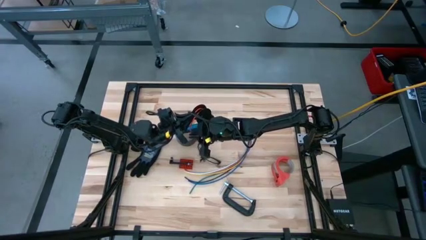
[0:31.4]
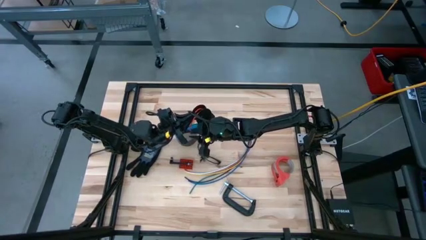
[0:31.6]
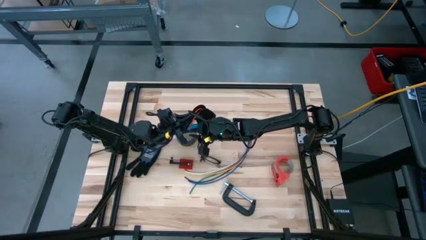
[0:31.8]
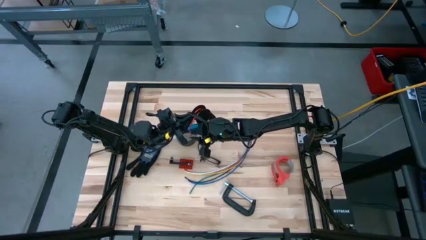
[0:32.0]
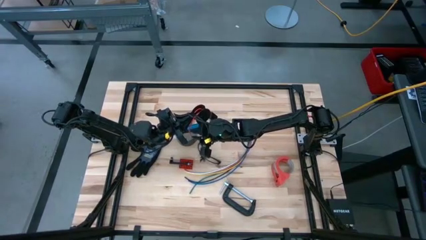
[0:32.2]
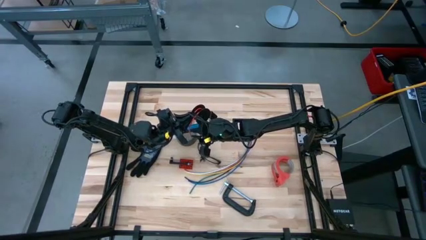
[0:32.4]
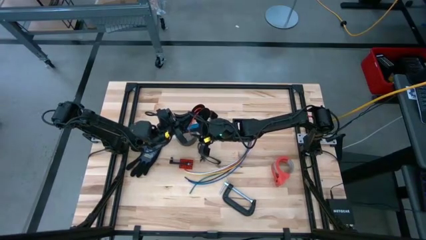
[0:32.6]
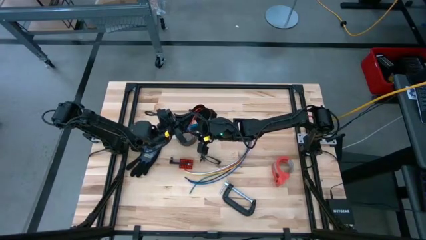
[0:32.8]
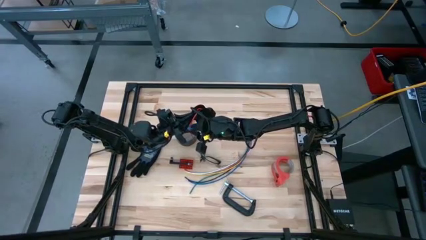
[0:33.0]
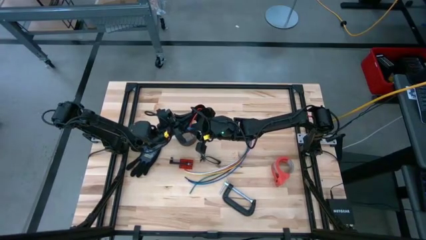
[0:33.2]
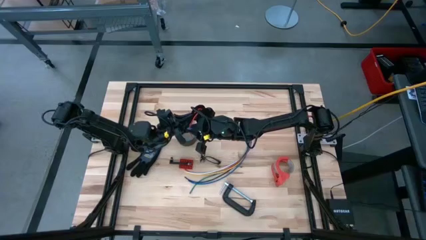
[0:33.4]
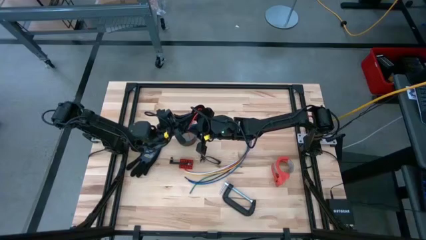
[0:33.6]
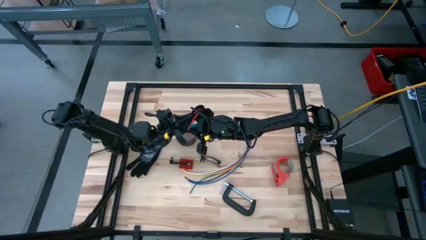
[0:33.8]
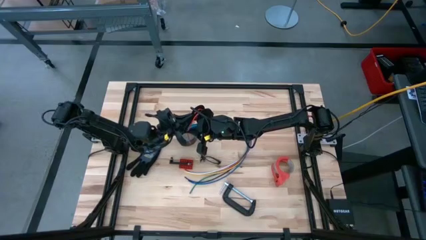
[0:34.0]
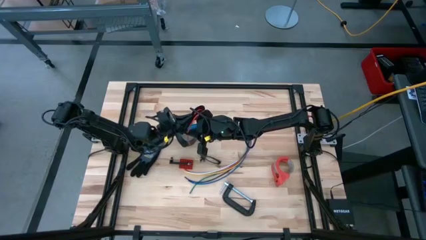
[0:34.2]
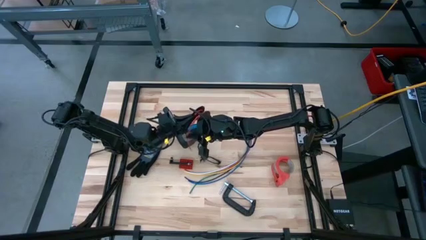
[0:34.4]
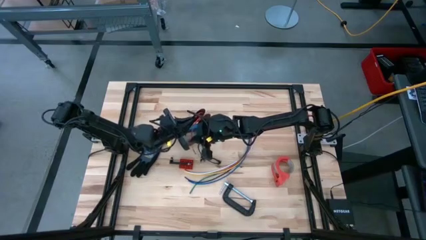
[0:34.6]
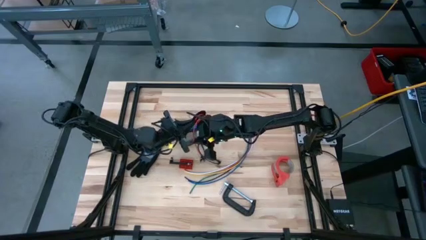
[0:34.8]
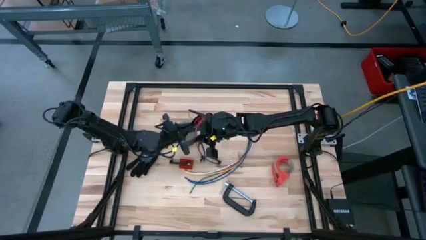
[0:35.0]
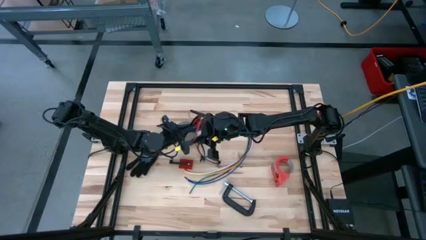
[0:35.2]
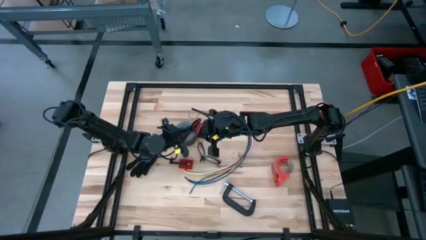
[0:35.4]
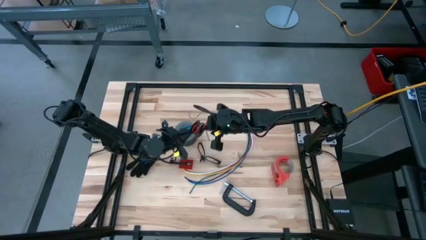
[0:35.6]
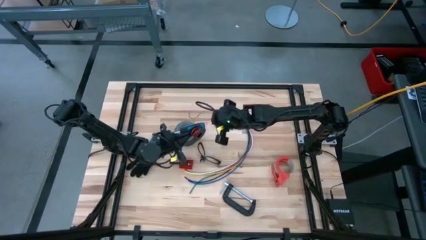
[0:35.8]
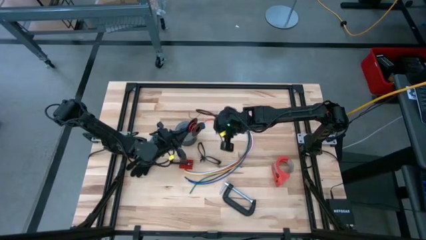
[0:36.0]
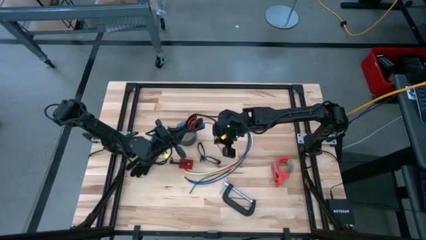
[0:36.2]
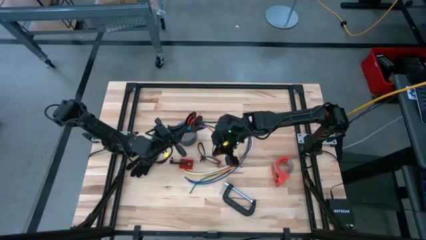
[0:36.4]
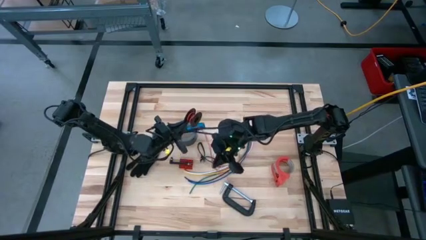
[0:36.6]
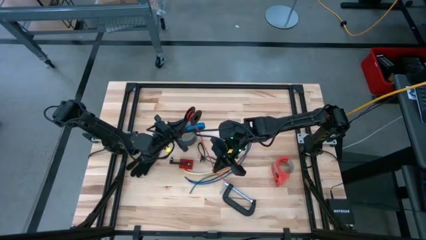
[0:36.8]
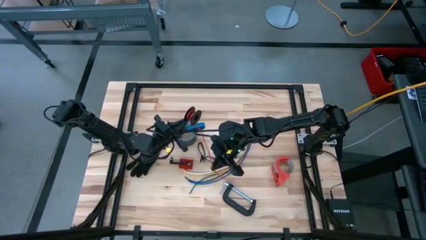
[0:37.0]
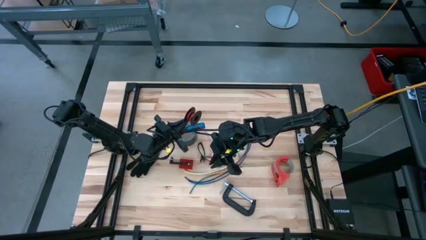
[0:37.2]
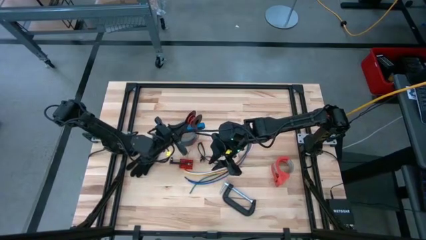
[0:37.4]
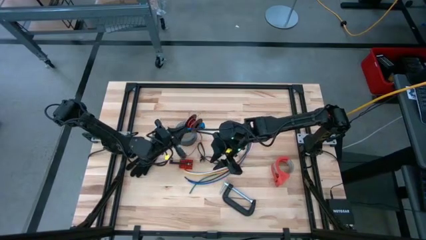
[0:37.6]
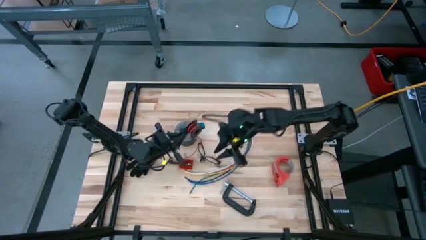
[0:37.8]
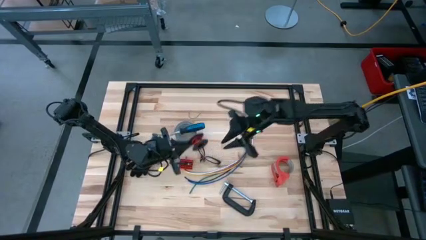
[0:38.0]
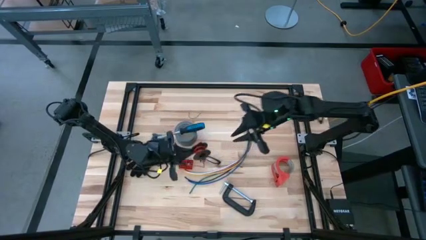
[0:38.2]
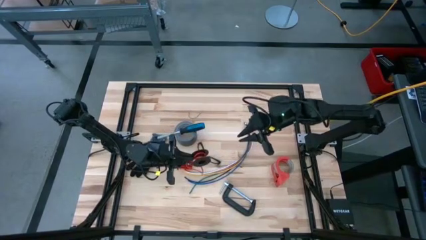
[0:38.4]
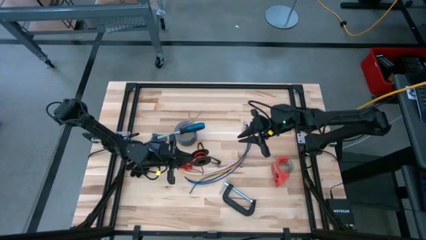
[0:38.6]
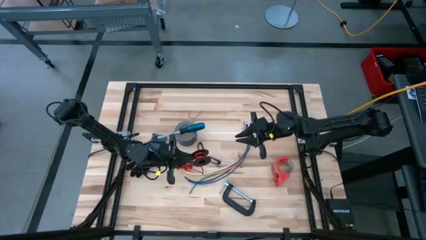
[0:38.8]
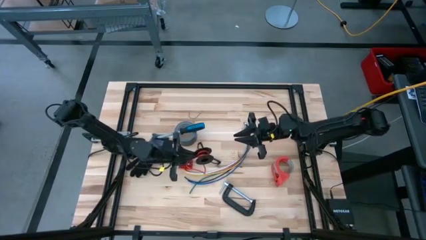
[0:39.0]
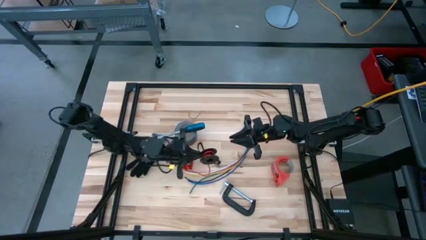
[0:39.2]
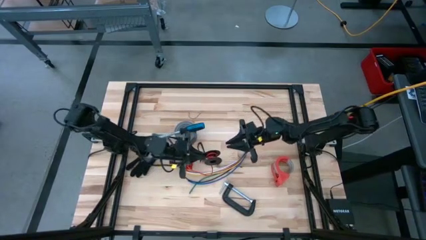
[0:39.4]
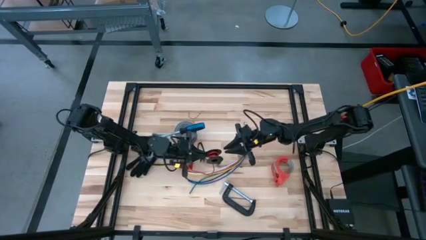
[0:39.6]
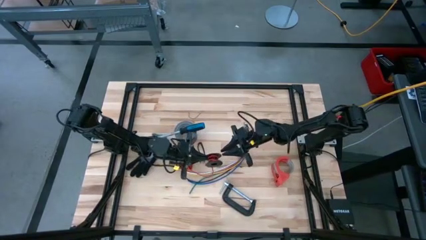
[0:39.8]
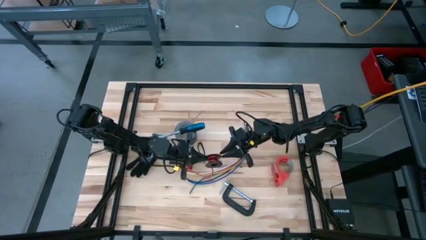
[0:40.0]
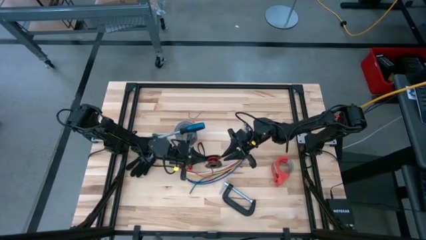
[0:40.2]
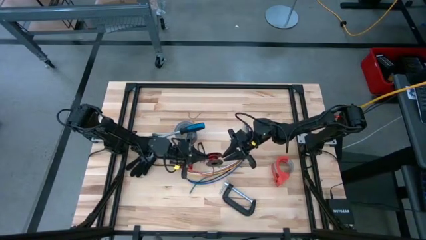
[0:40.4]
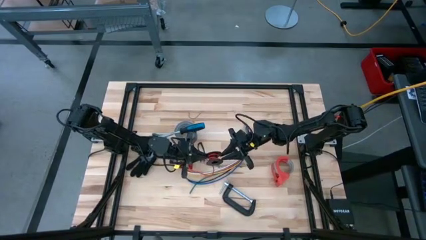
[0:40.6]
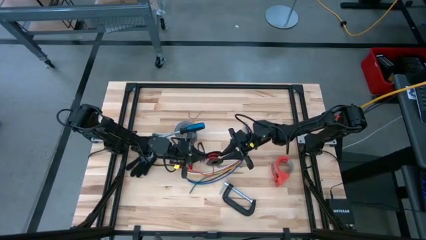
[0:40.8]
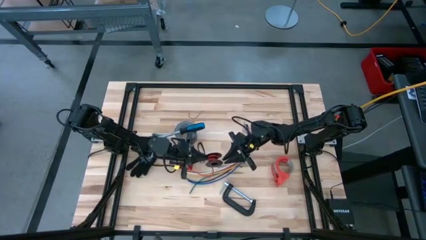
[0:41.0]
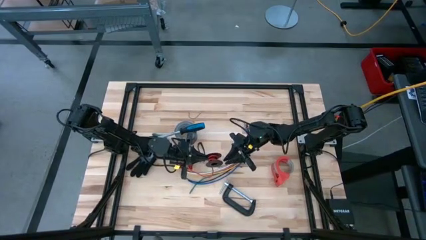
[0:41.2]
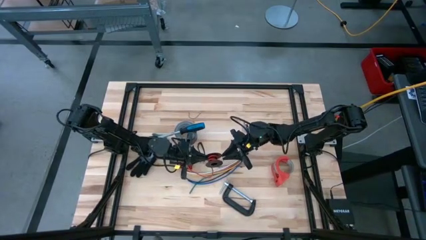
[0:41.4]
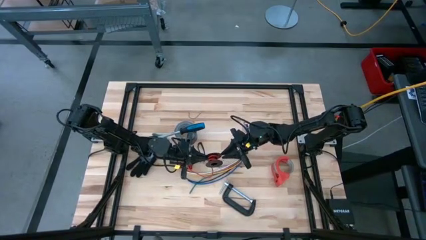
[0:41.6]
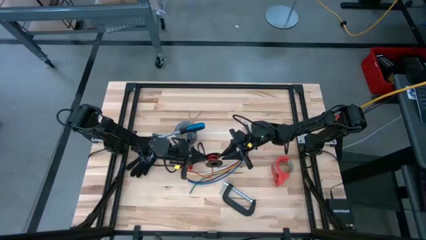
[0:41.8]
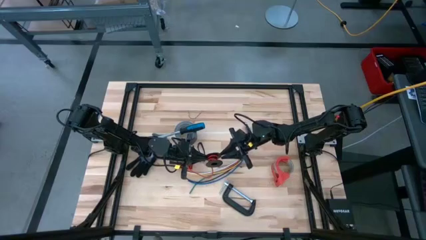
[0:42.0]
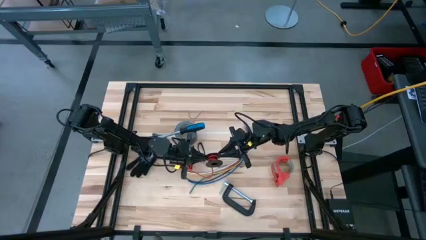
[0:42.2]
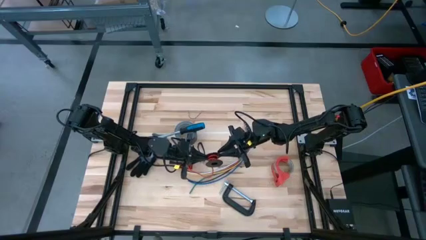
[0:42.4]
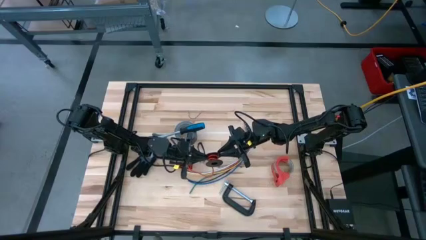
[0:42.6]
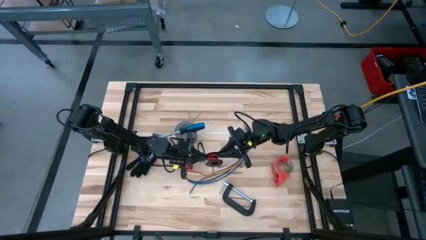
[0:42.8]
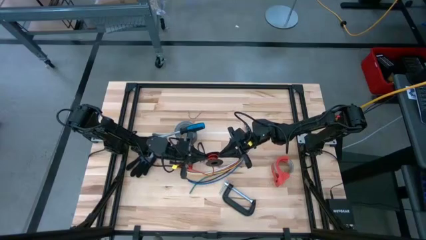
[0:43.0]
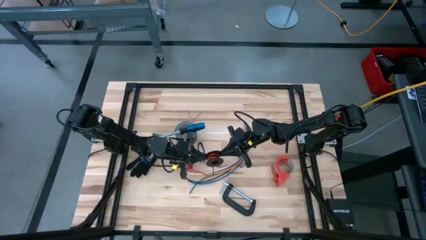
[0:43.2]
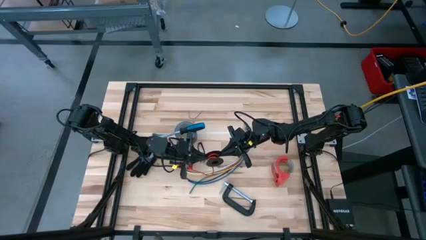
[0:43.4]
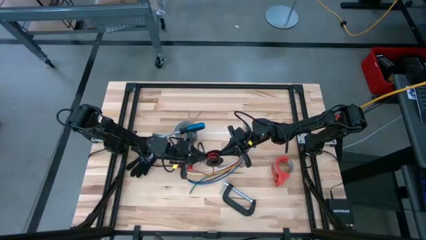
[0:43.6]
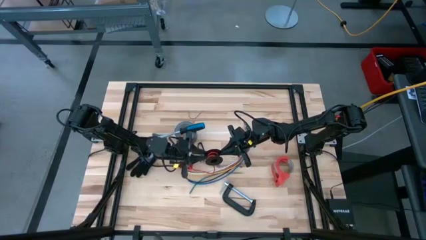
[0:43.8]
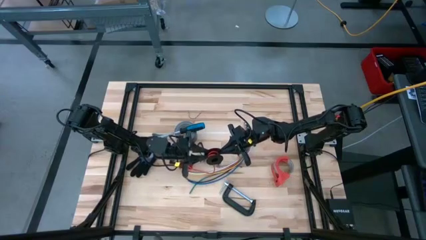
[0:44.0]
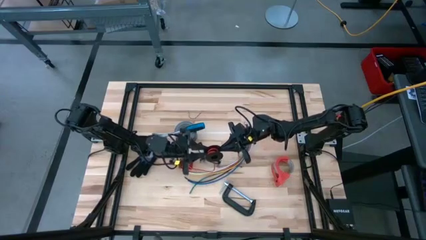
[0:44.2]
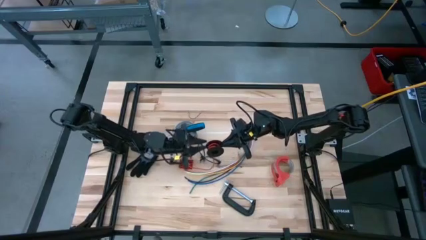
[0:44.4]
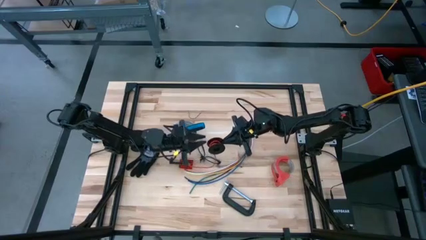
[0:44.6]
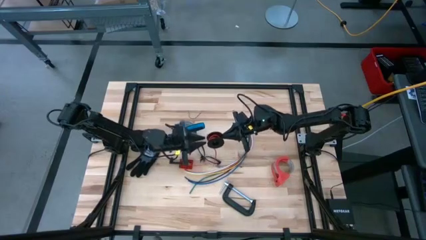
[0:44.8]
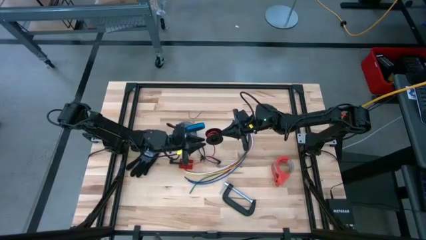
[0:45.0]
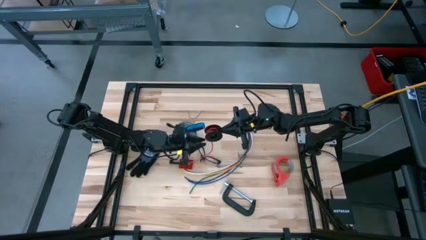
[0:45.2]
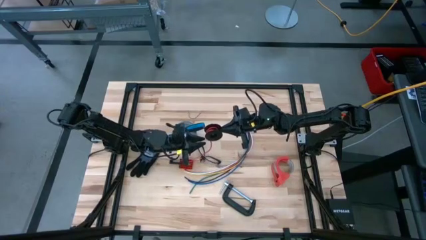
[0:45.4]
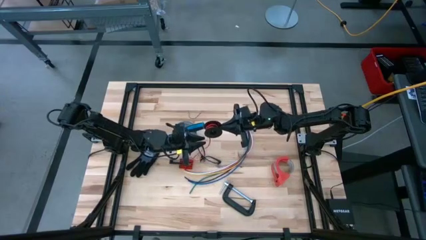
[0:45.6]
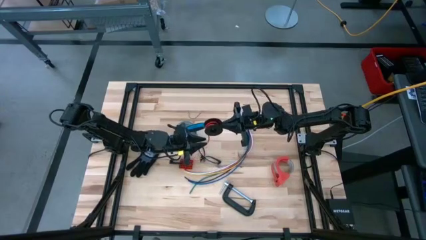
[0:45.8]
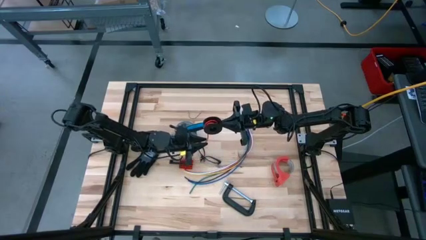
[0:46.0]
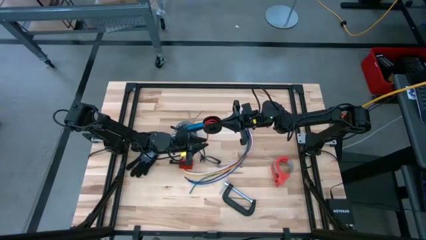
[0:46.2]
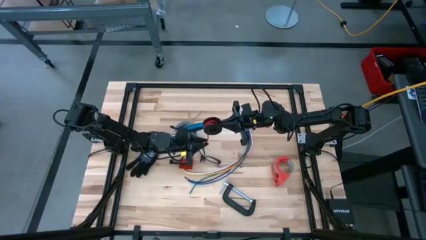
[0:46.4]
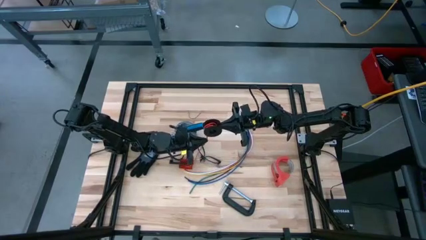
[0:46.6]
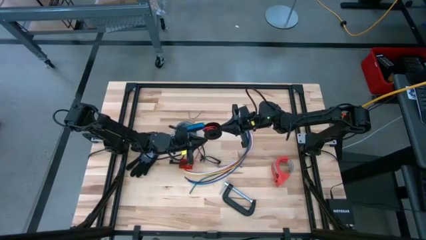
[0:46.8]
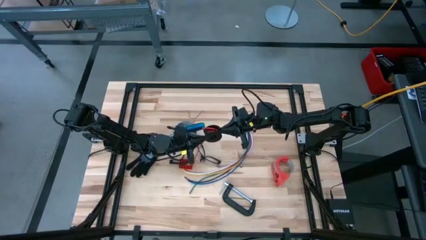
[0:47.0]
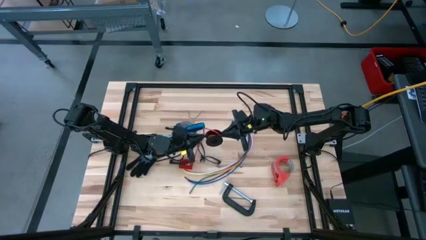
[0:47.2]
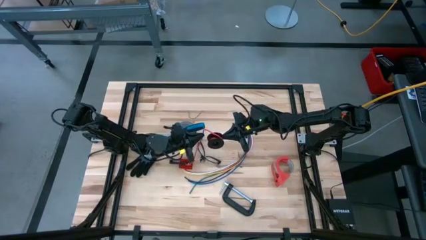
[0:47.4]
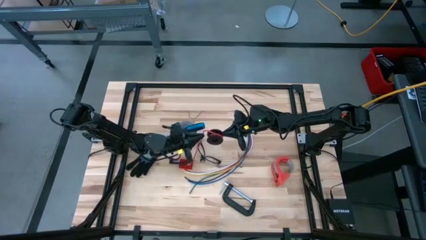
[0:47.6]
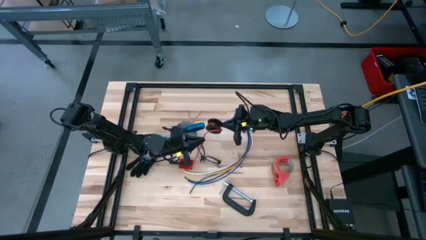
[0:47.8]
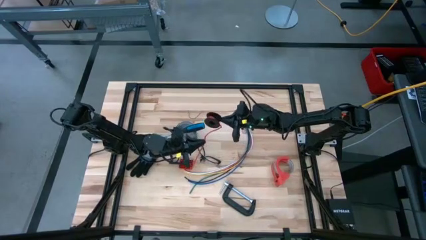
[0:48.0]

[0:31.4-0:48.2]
Task: Coil cords
Uncoil the red wire from the black spool
